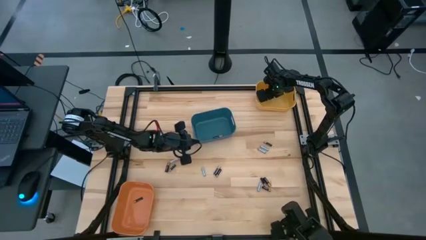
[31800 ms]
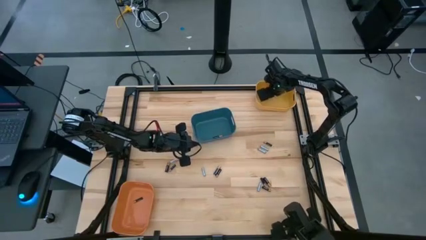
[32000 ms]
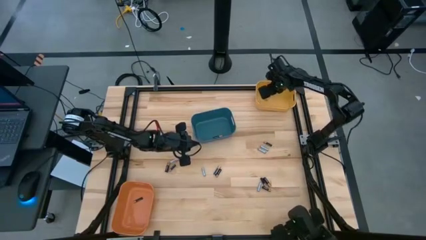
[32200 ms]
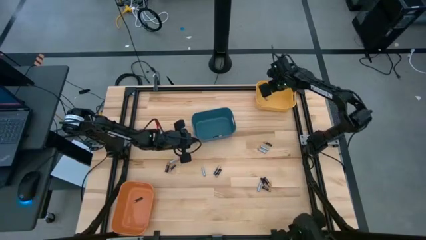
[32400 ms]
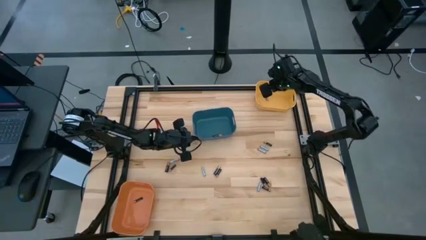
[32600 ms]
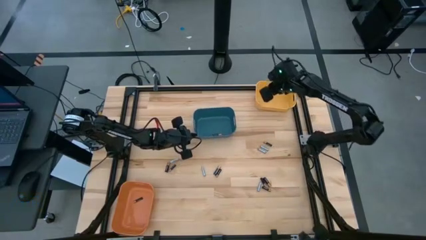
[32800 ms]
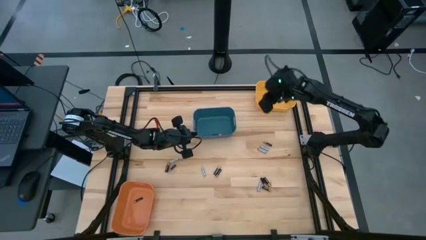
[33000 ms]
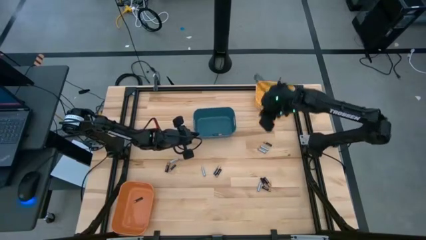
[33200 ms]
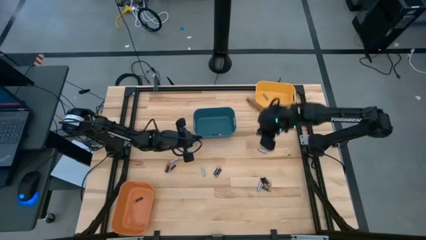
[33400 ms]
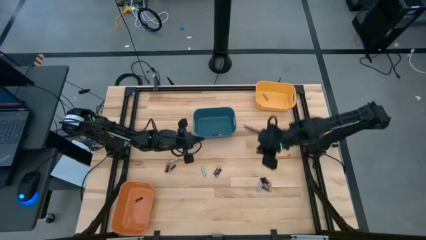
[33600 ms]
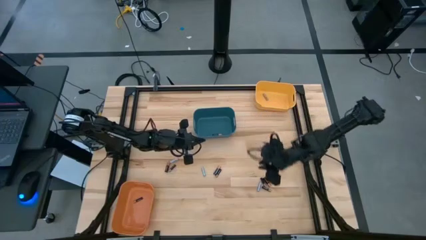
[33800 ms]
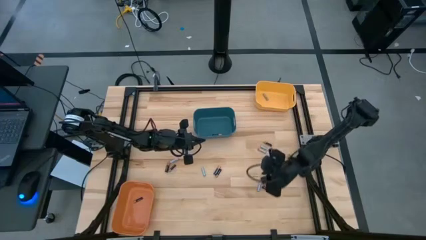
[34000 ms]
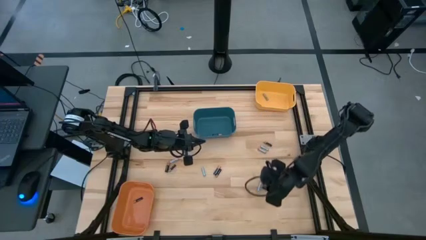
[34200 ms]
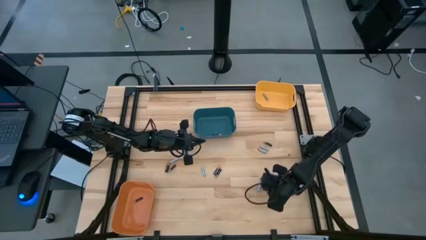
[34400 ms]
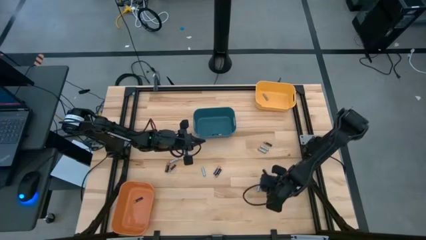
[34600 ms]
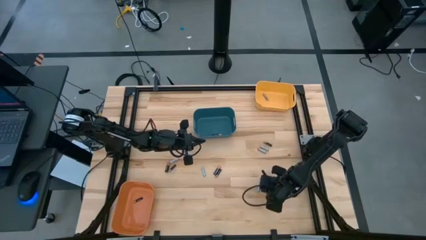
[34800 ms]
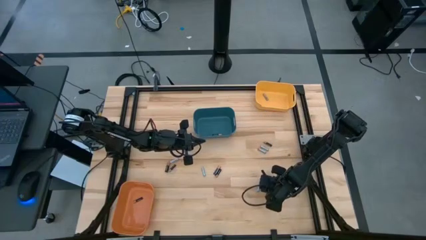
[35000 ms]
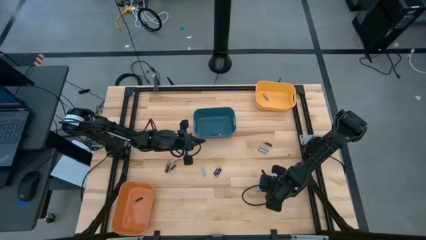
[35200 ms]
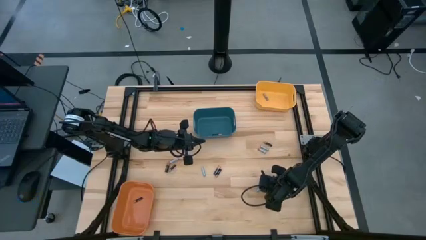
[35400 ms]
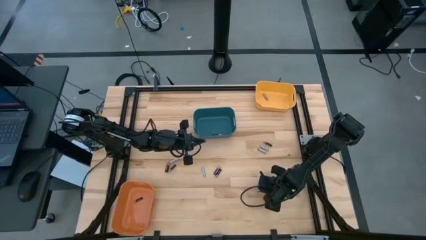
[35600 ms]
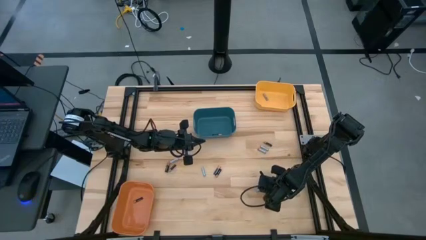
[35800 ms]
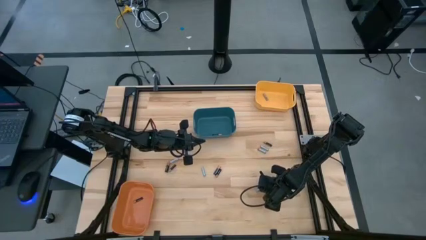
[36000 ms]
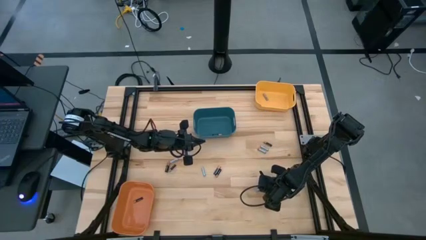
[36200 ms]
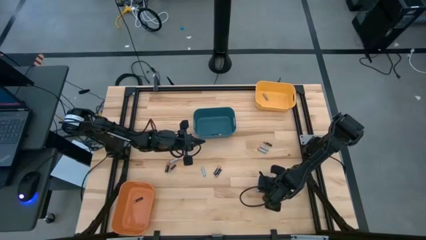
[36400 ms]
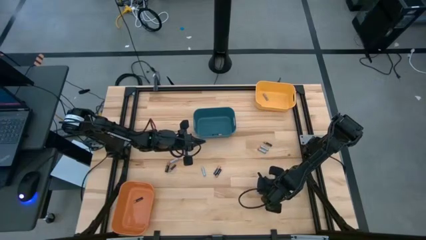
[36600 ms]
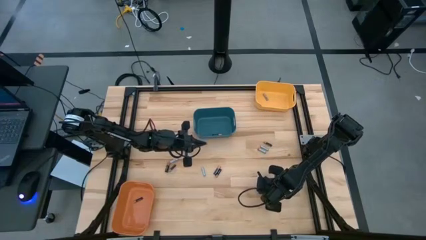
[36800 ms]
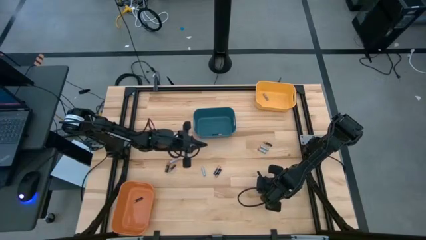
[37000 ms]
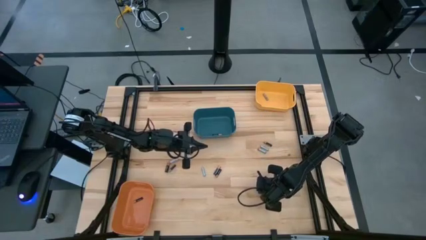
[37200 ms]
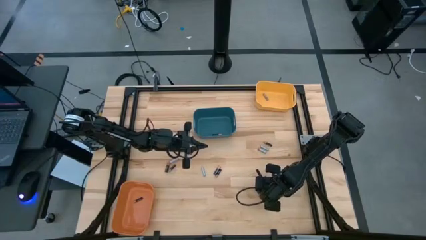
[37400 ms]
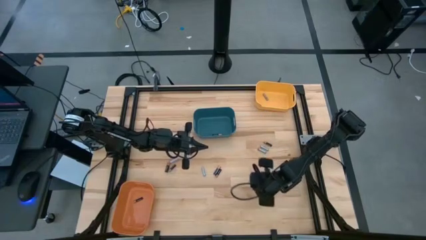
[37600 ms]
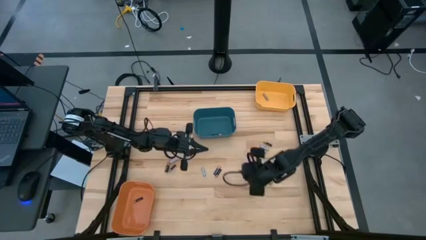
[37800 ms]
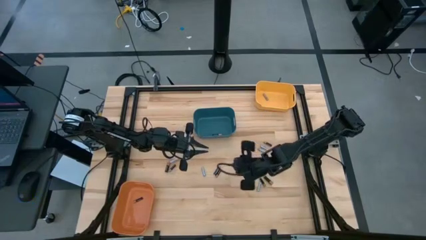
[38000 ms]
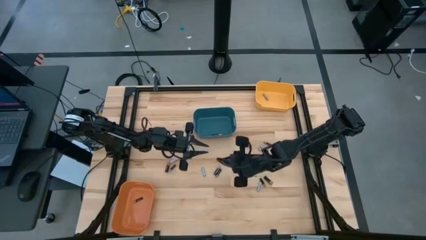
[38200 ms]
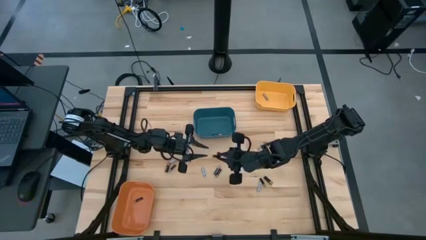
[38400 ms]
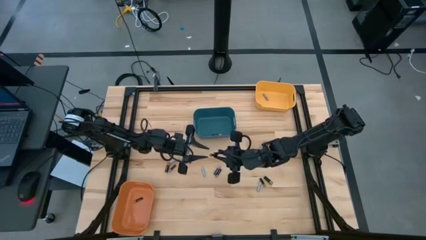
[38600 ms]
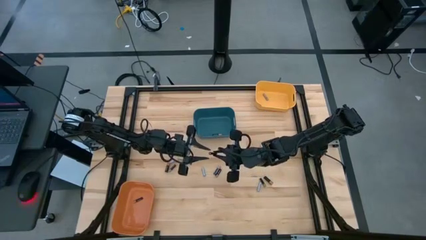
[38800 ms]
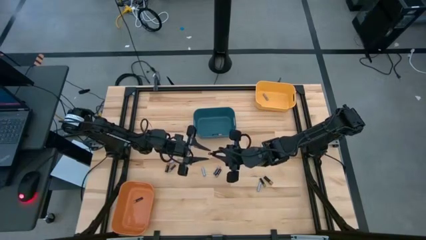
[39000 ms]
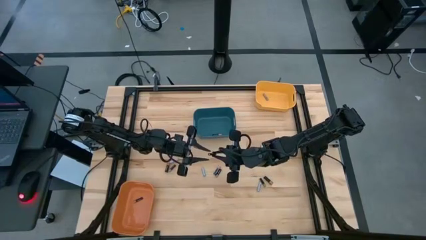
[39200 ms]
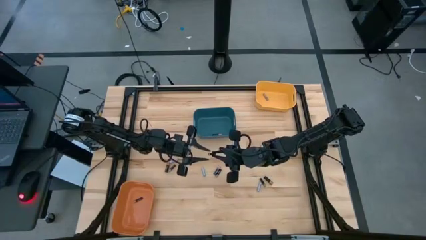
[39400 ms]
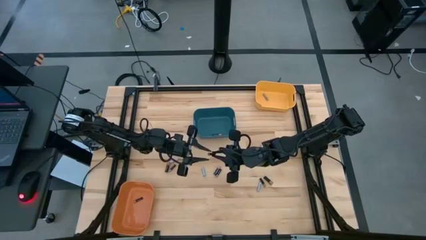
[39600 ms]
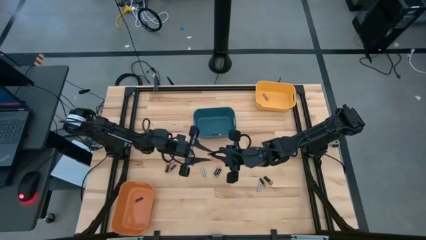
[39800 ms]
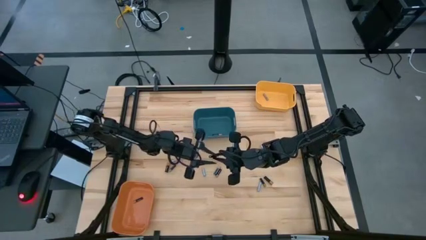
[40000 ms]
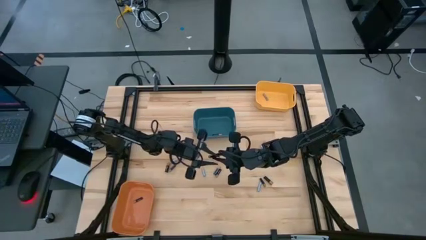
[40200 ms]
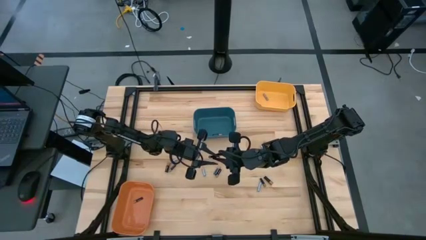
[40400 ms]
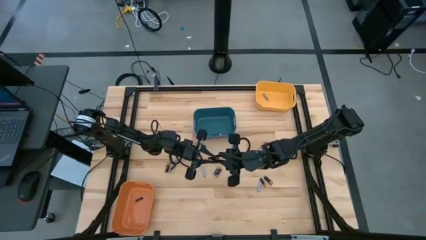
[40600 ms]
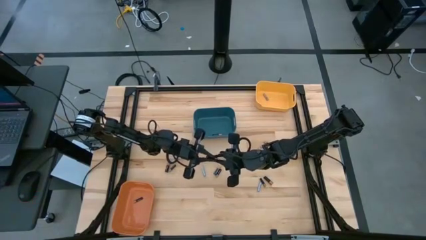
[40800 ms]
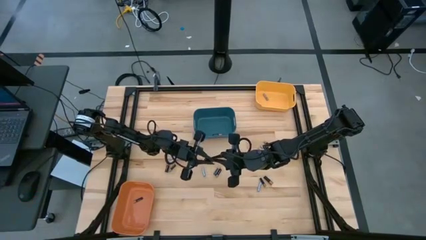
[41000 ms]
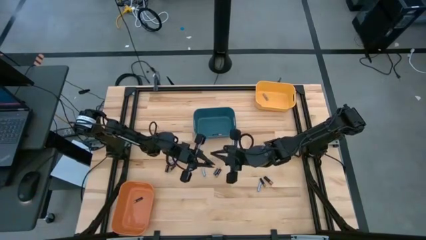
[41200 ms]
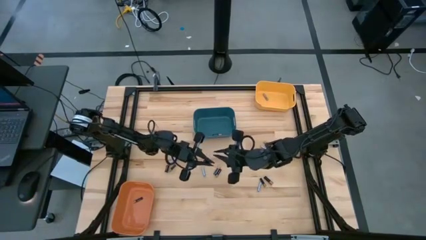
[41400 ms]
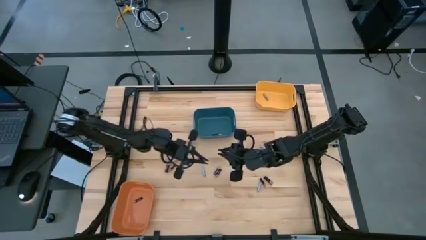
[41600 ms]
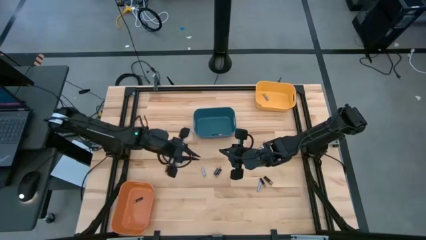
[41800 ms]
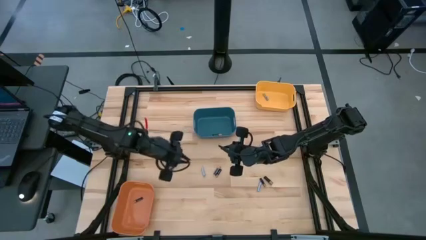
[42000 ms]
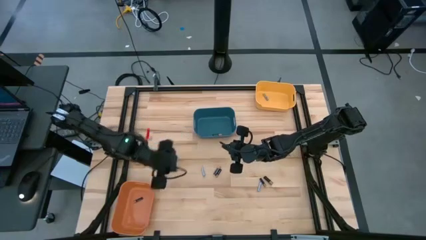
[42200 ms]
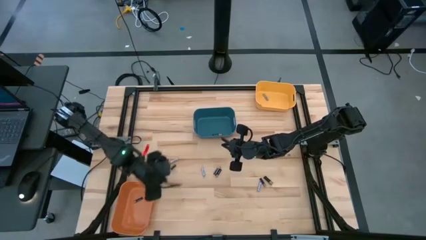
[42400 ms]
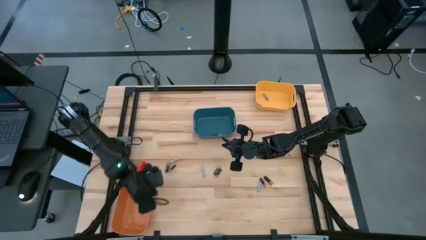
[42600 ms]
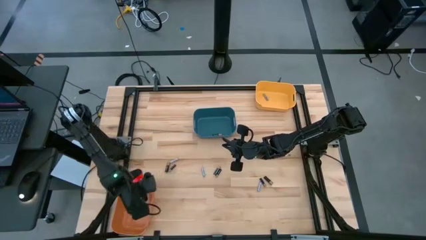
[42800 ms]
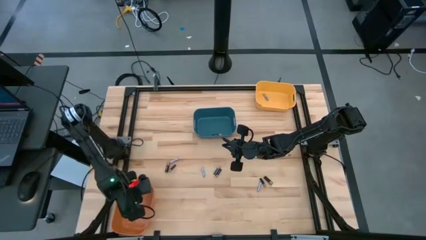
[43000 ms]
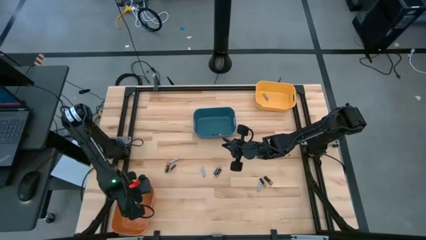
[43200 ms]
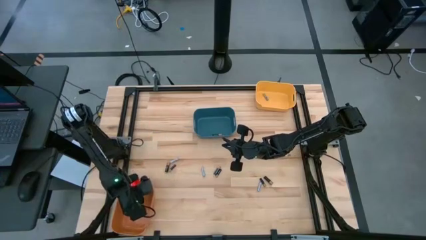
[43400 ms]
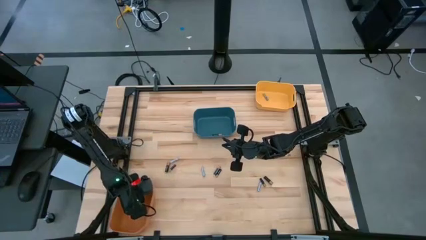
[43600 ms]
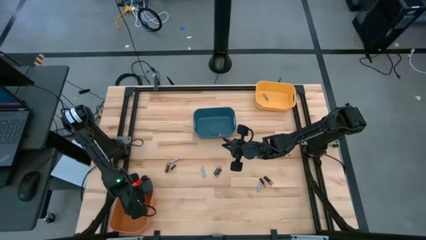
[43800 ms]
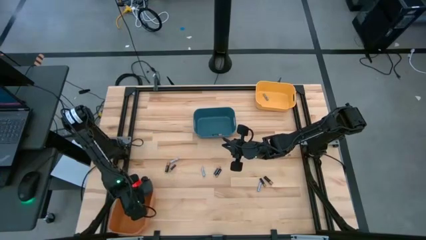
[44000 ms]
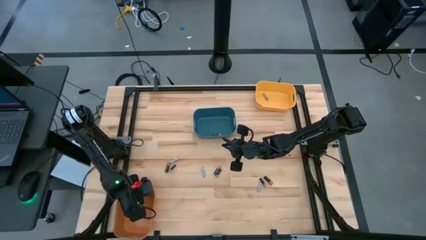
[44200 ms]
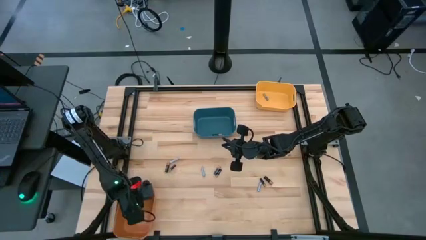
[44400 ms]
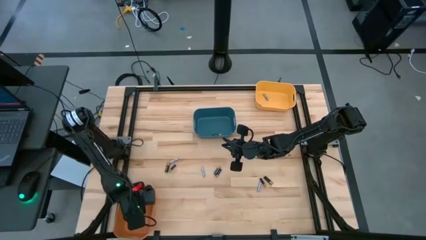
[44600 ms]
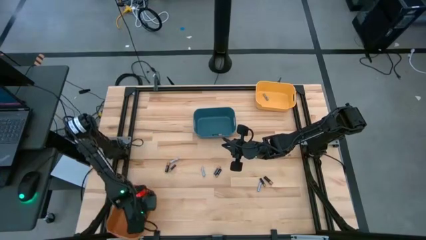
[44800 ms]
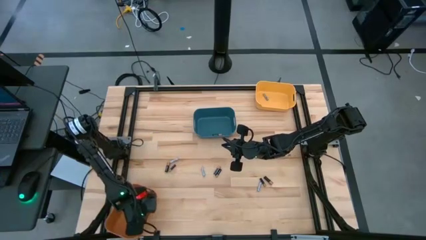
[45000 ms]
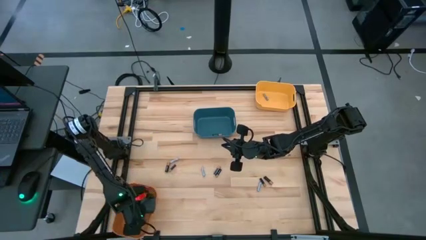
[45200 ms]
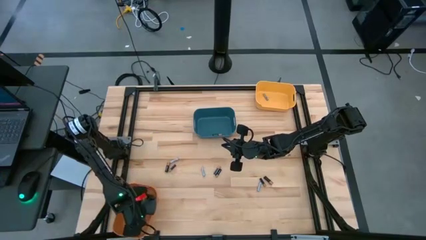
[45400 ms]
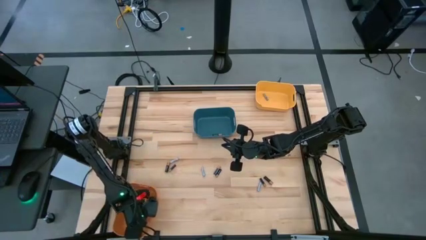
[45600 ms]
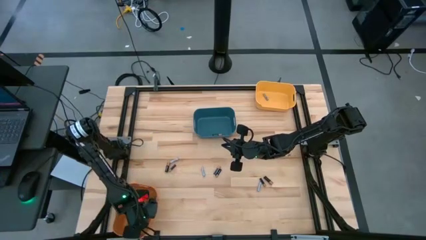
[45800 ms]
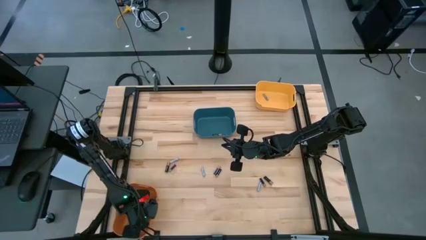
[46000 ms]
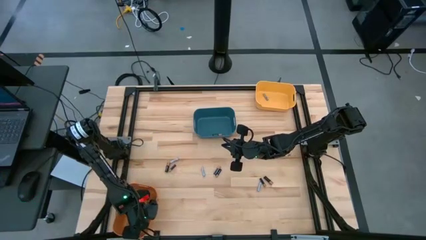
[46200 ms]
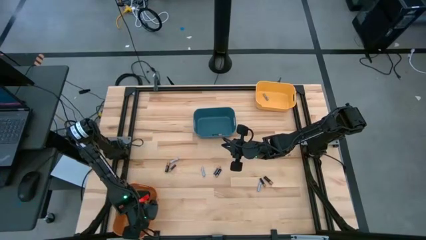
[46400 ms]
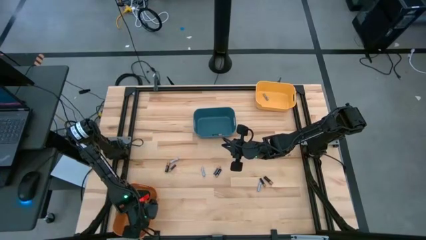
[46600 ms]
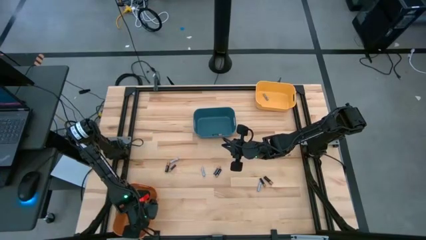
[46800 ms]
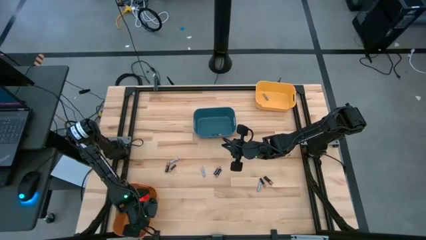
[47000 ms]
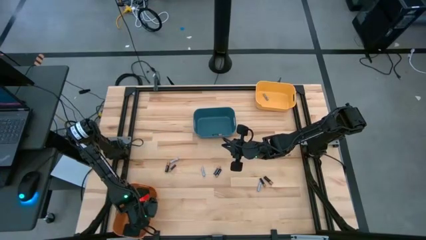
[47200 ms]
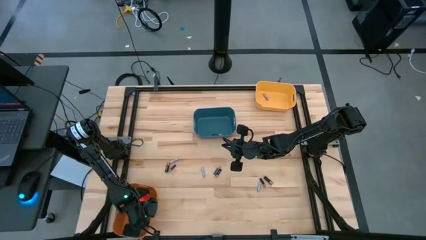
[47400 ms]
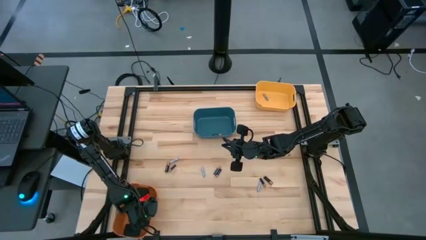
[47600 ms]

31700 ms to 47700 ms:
Task: Sort batteries
Put the small black battery into the orange bin
